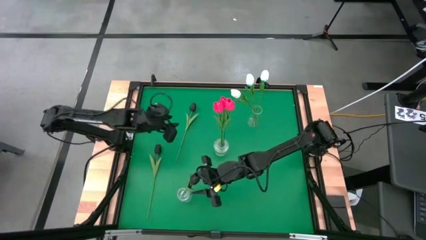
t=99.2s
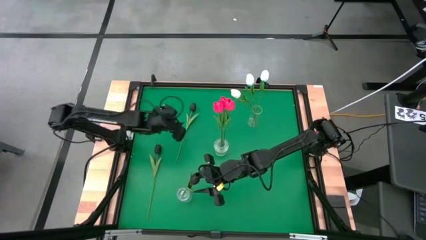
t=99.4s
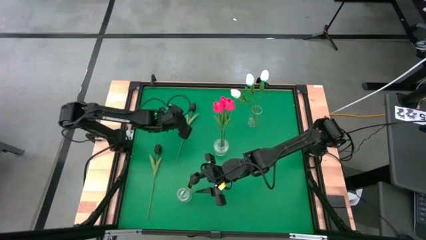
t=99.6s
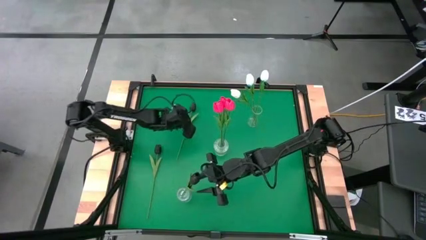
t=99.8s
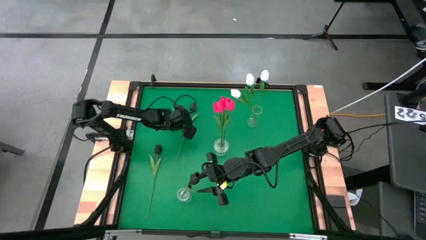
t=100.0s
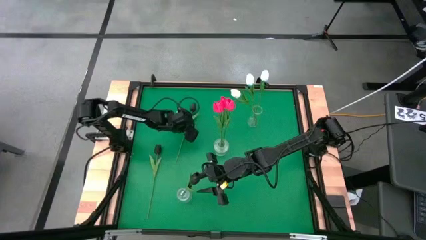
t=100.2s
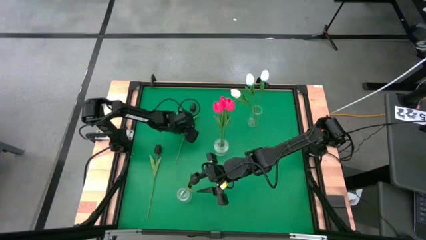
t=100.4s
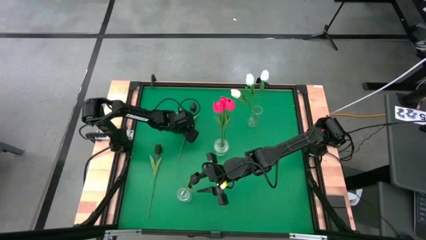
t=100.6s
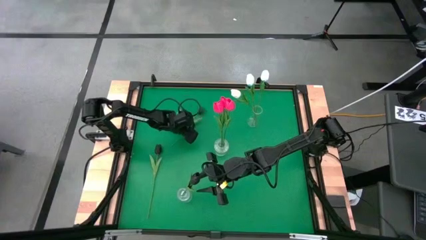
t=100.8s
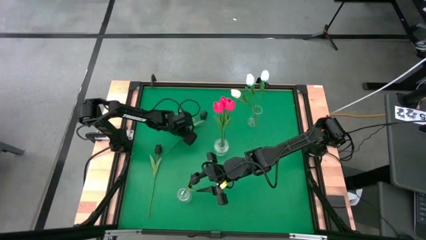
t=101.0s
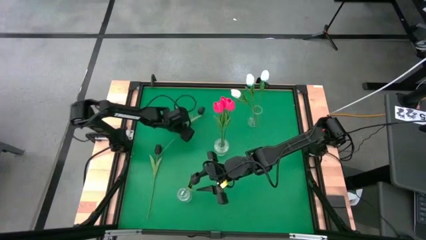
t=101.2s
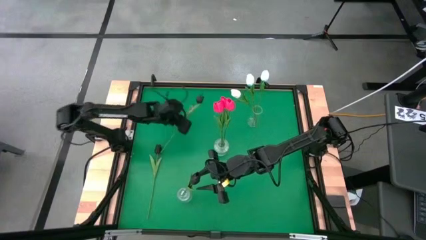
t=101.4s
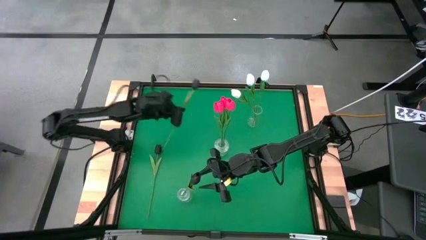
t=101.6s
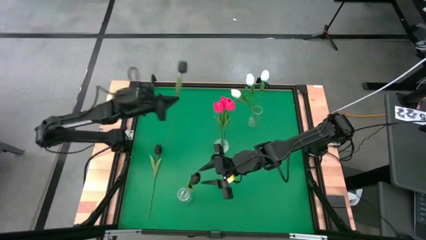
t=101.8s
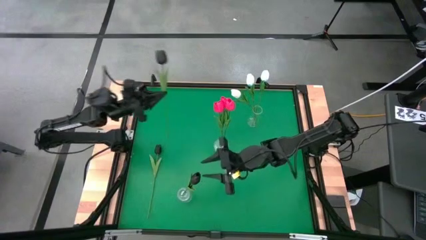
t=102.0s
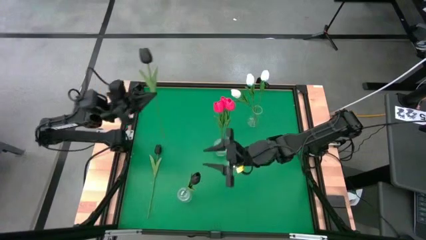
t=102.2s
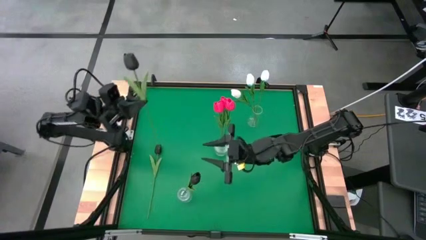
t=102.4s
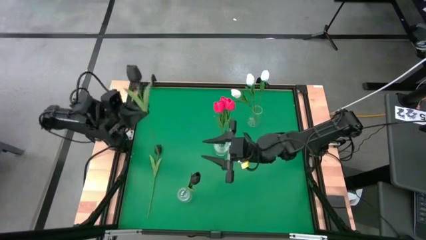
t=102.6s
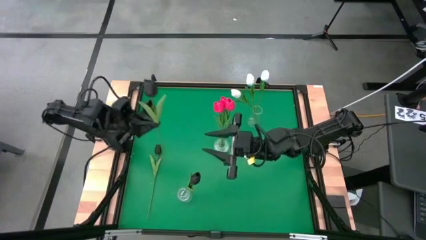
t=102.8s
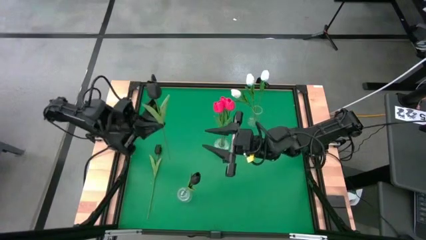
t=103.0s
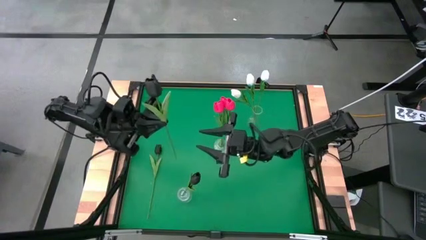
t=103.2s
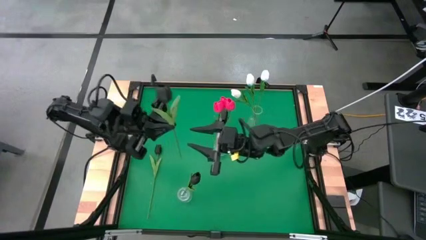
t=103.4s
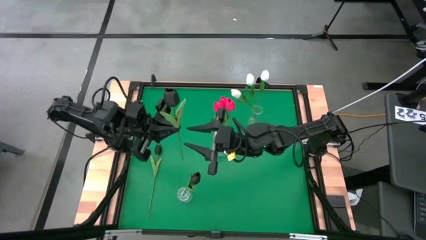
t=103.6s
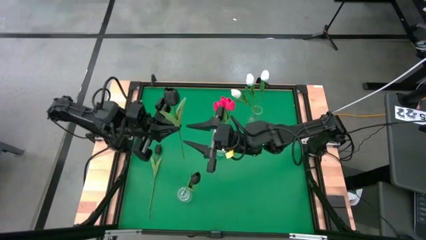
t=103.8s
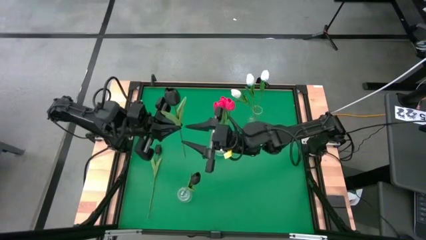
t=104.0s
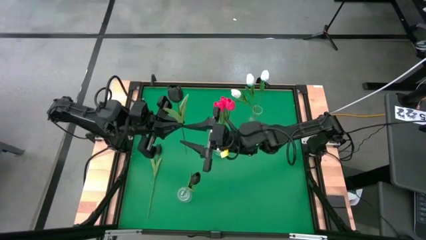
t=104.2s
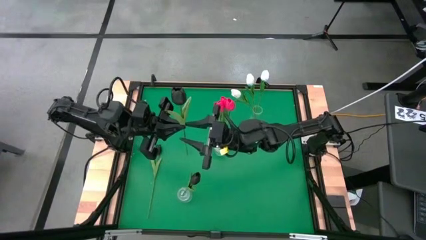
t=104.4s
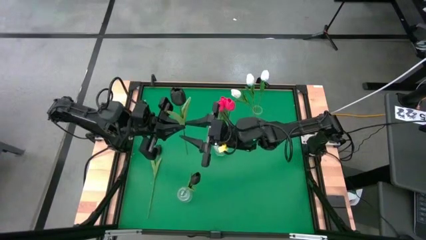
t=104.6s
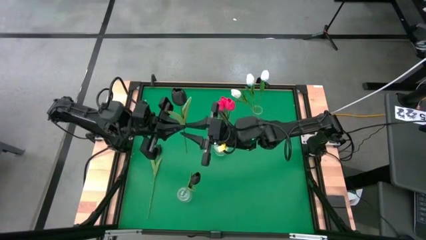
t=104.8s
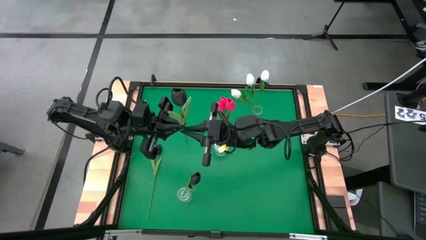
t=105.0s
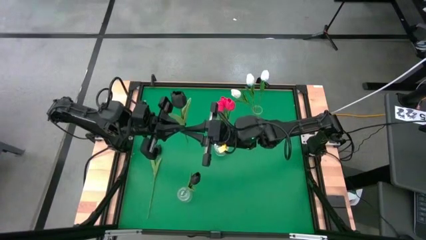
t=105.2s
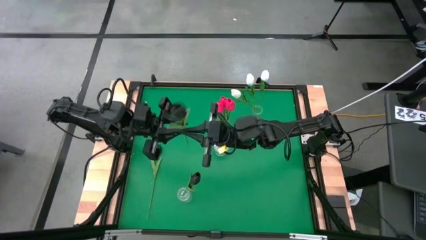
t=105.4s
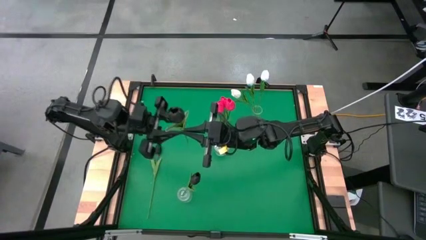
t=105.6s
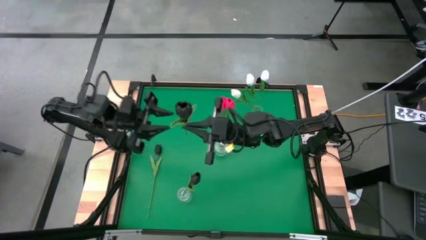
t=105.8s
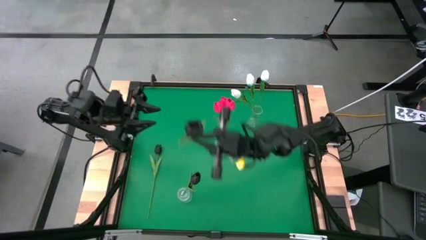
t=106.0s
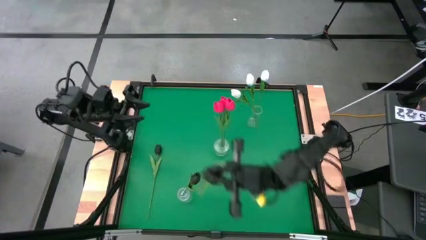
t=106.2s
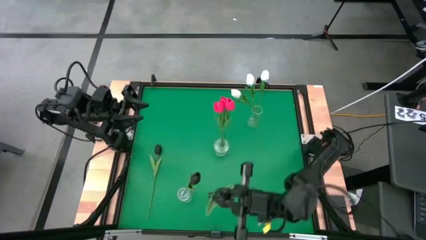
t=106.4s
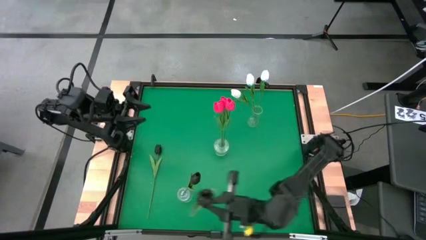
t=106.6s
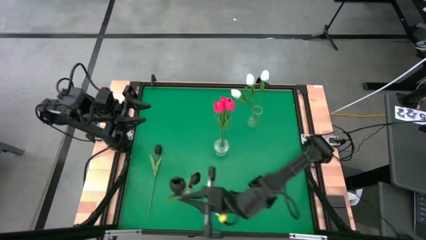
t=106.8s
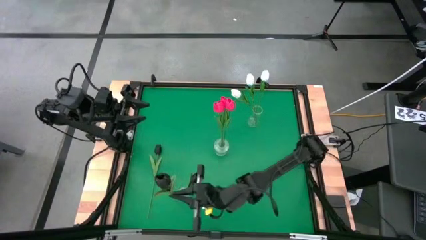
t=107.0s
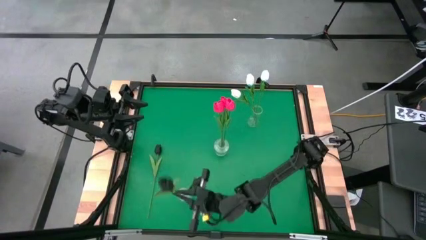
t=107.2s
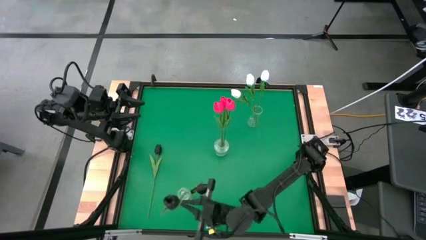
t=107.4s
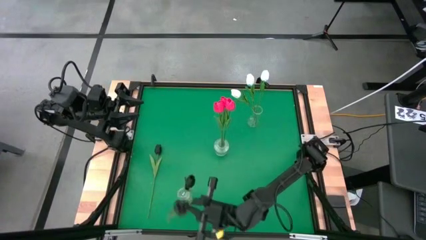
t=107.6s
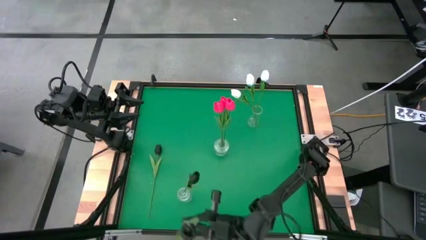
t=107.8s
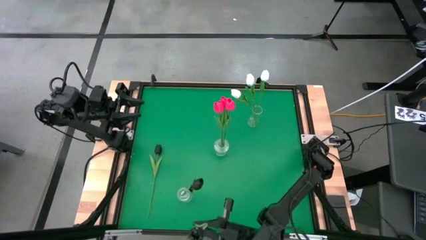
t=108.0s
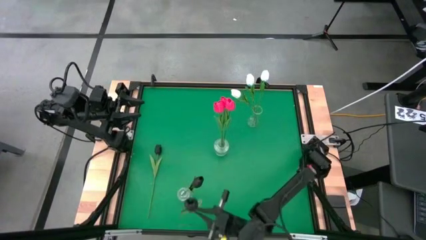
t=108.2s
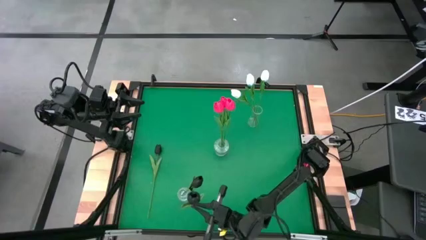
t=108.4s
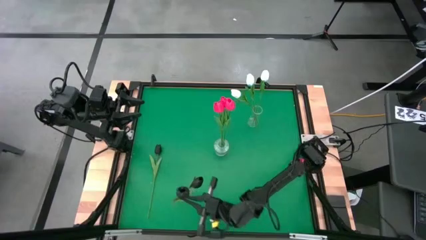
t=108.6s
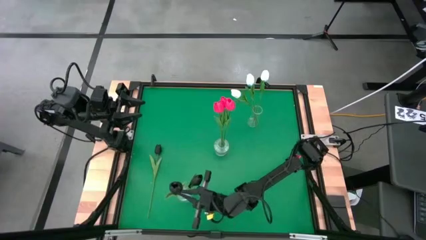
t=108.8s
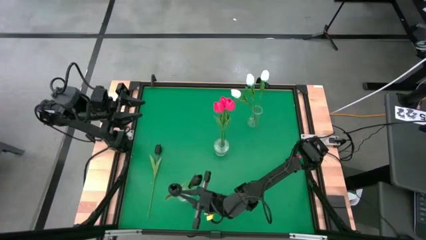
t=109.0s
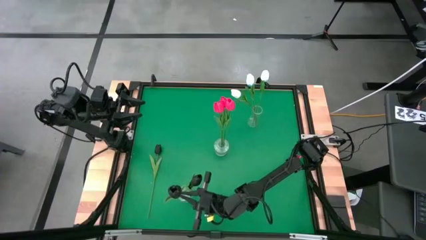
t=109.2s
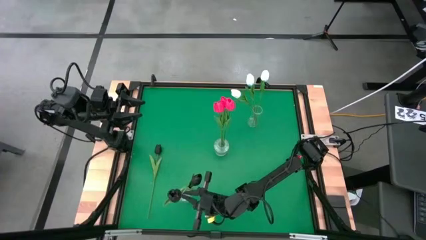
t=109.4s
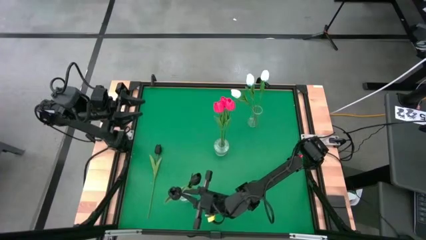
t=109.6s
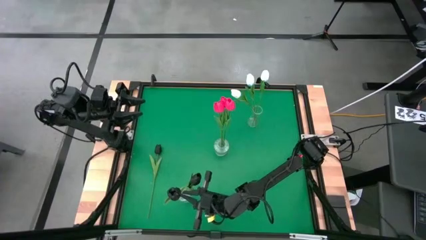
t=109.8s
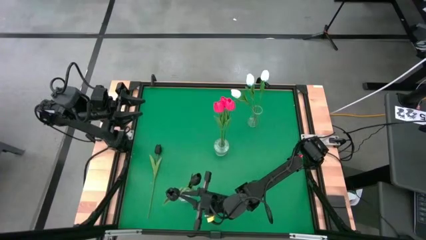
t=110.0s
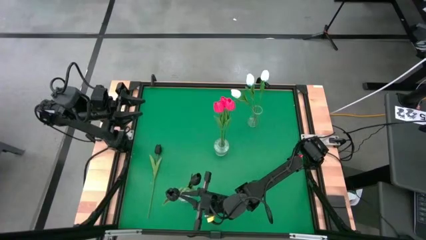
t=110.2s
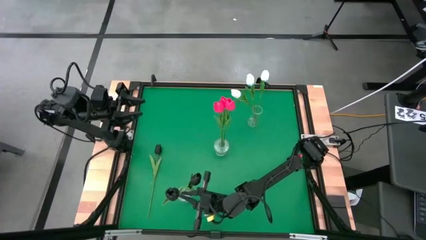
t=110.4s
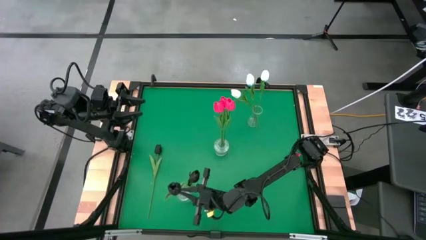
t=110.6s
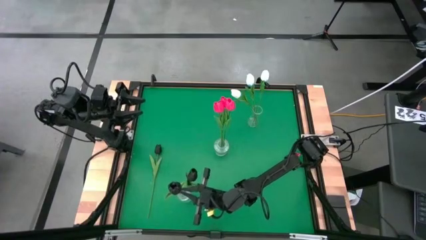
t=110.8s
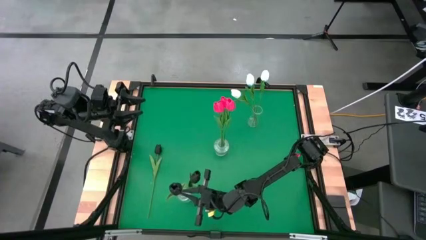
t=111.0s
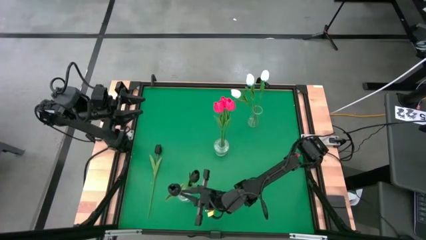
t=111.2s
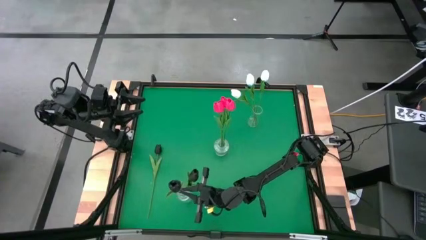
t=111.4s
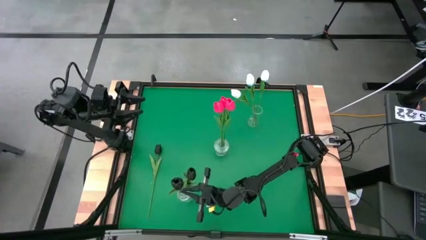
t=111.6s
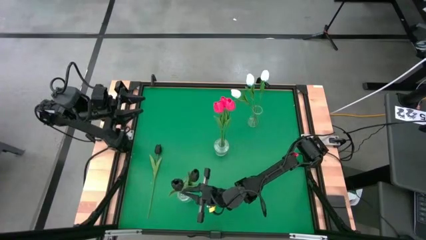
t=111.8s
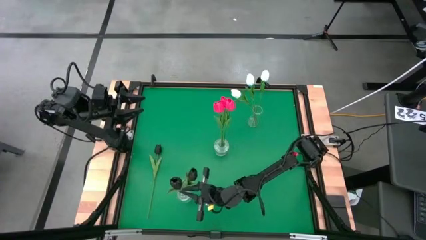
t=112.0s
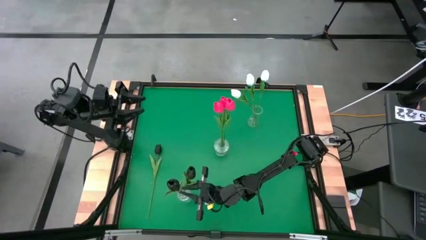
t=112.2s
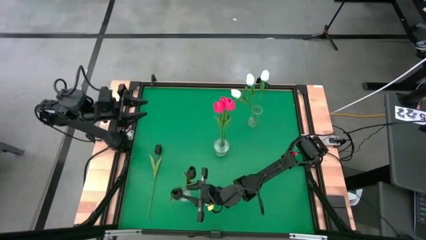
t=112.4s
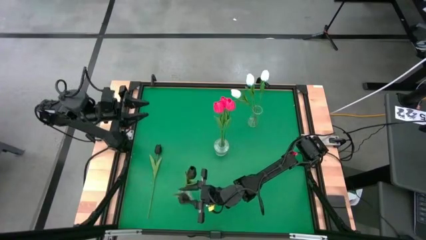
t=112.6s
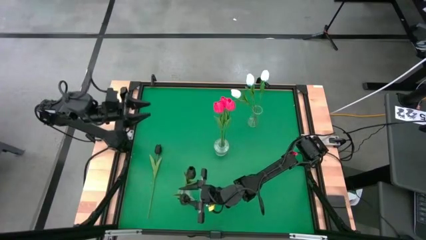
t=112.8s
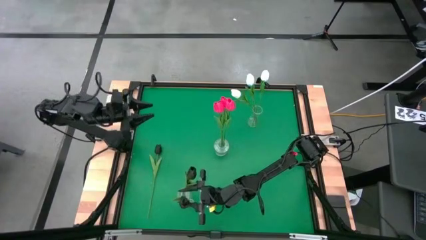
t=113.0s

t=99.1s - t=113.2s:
Task: Sort flowers into vase by color
Put the top black tulip into the bottom transparent flower vase

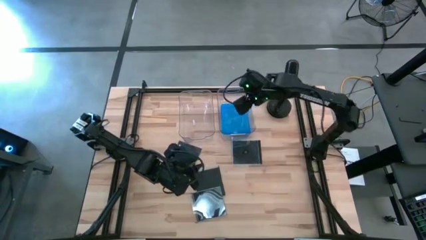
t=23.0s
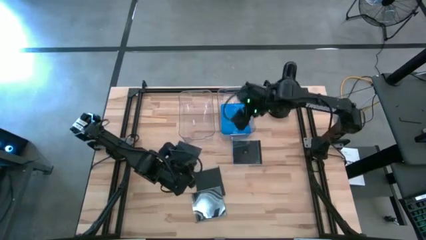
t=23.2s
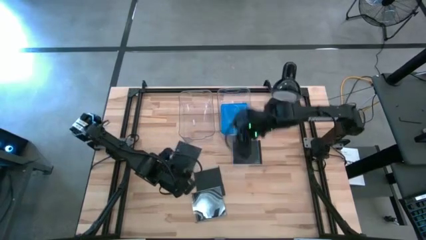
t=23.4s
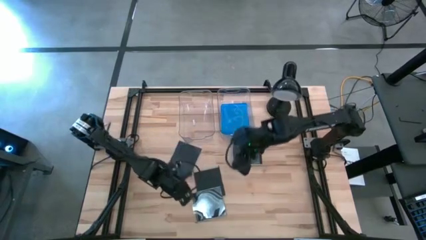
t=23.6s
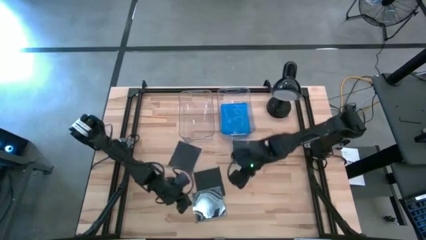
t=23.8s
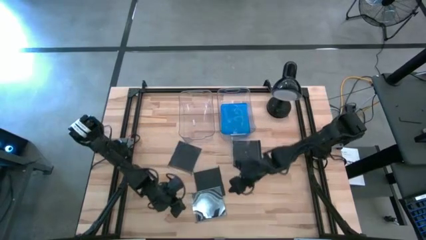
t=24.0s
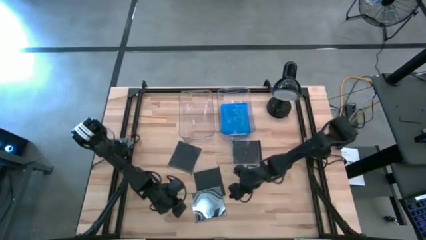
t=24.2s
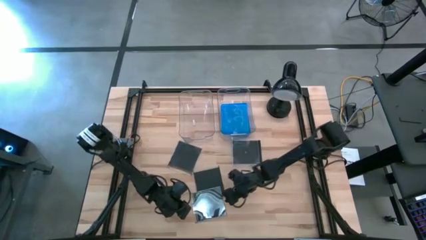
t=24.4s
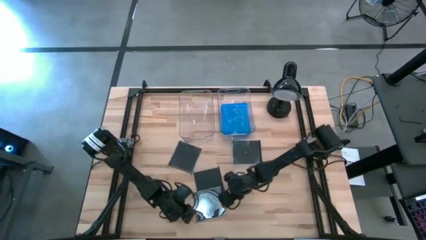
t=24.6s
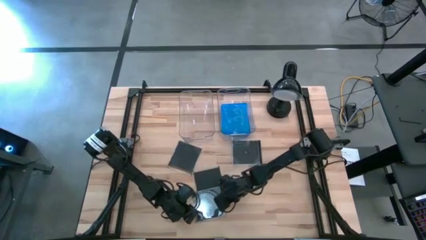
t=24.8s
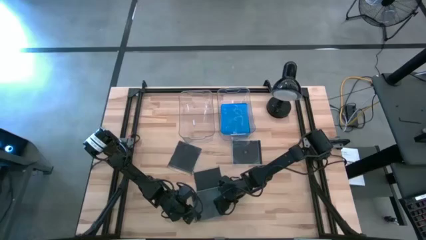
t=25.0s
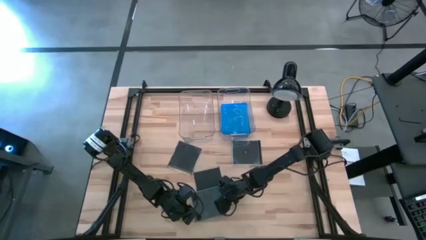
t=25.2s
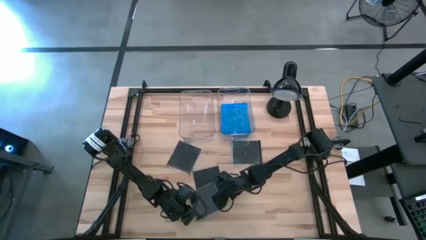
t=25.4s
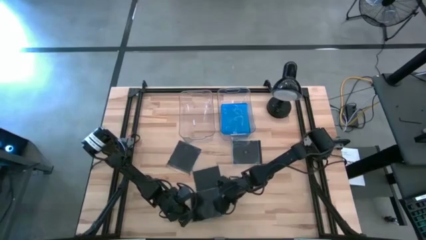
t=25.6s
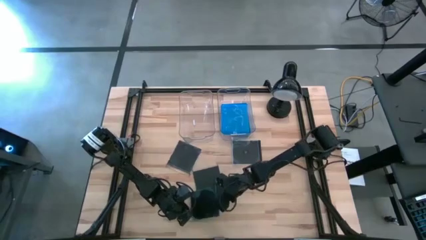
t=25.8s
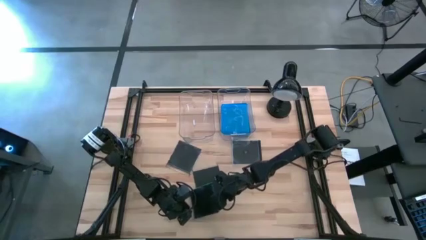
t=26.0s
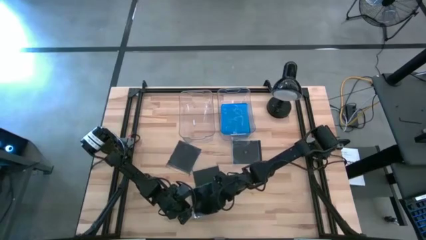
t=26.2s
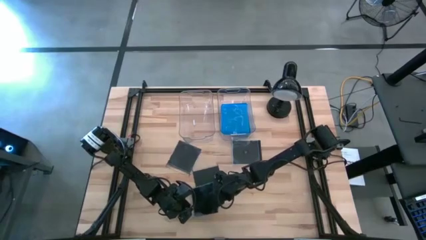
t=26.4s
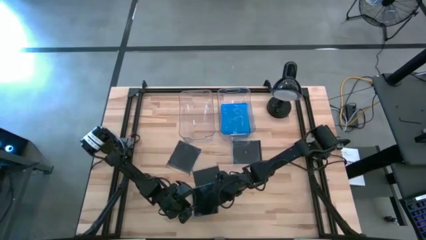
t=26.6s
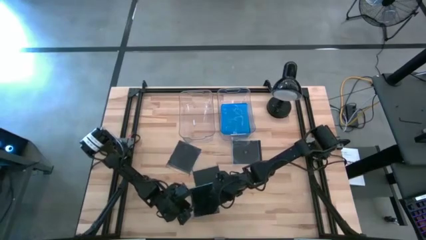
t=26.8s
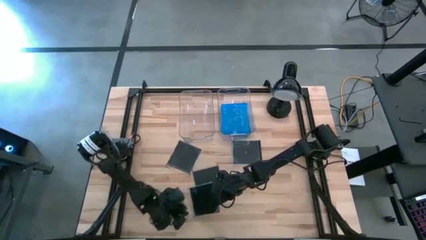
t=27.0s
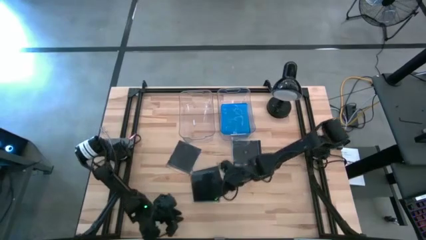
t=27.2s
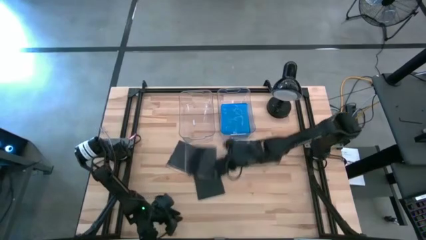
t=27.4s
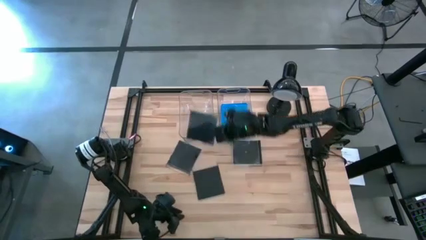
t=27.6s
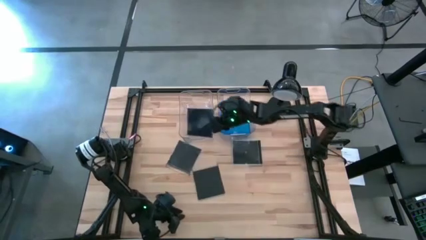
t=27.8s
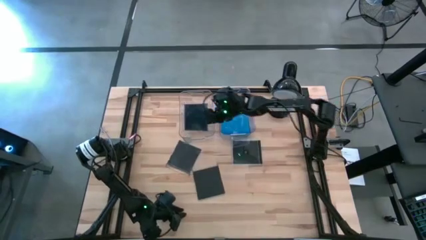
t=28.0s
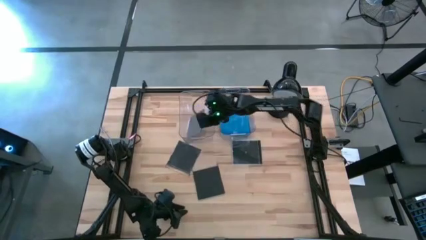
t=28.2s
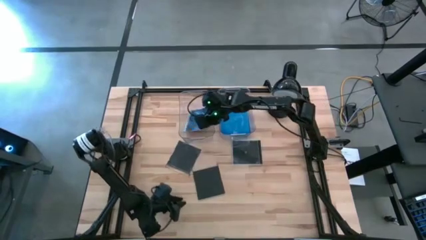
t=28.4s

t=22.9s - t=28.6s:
Task: Pick & place jewel cases by type
Put the black CD case into the left transparent bin
